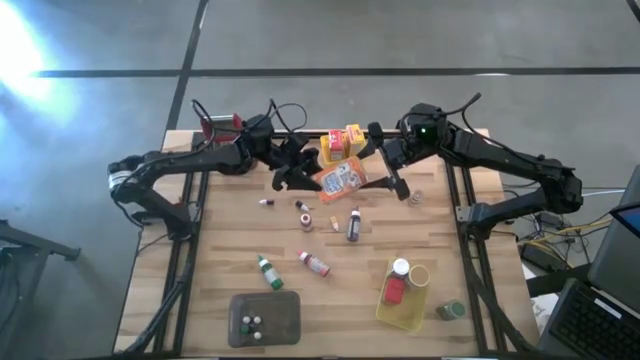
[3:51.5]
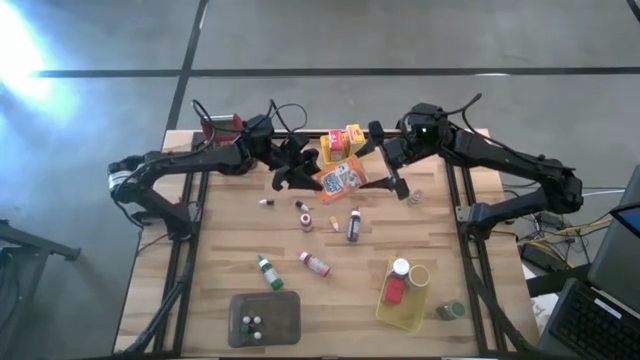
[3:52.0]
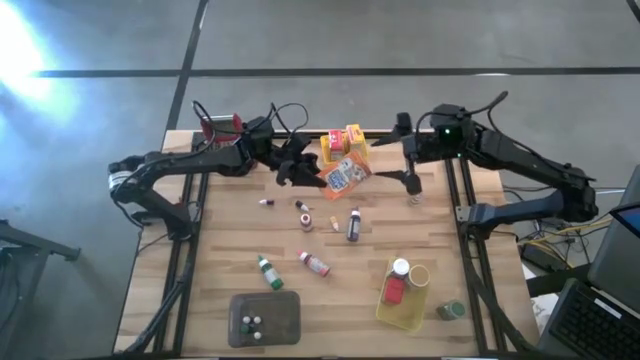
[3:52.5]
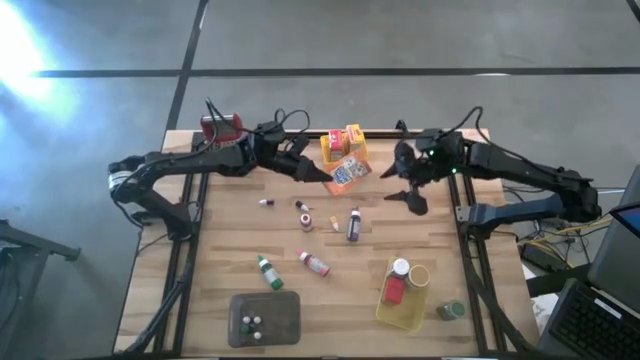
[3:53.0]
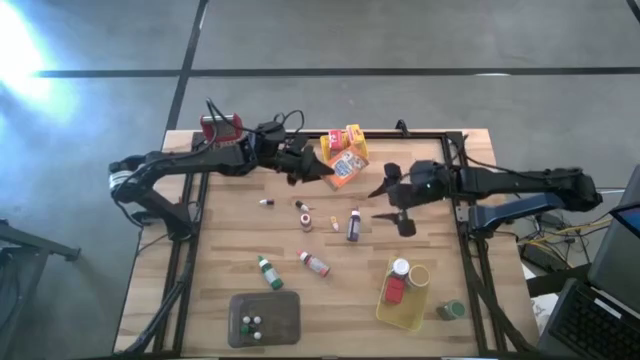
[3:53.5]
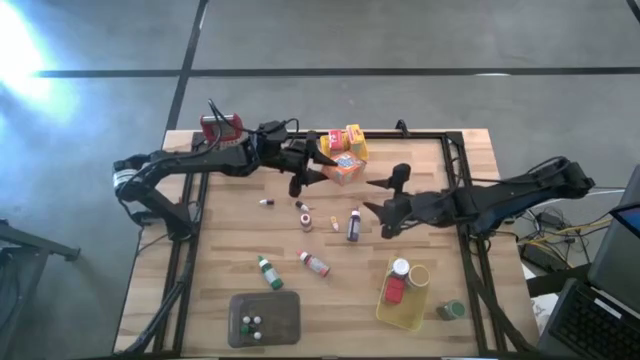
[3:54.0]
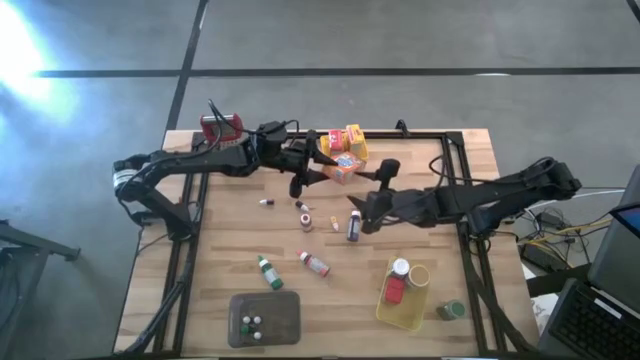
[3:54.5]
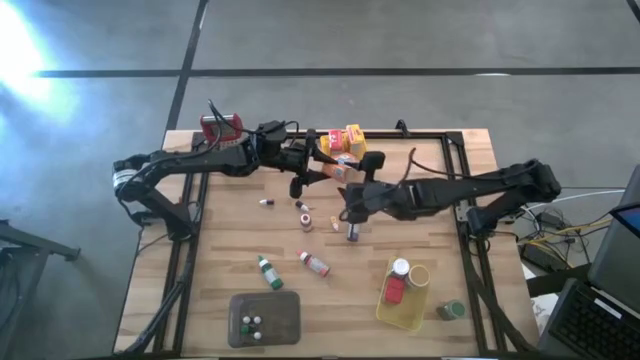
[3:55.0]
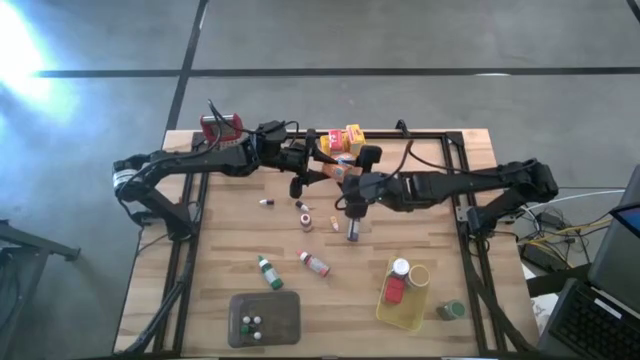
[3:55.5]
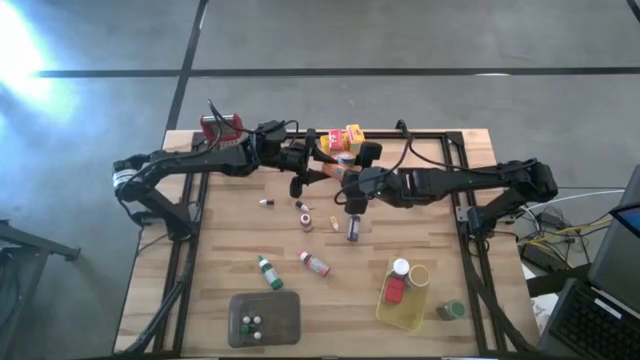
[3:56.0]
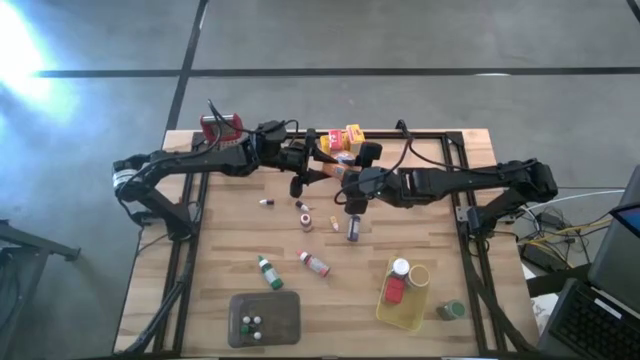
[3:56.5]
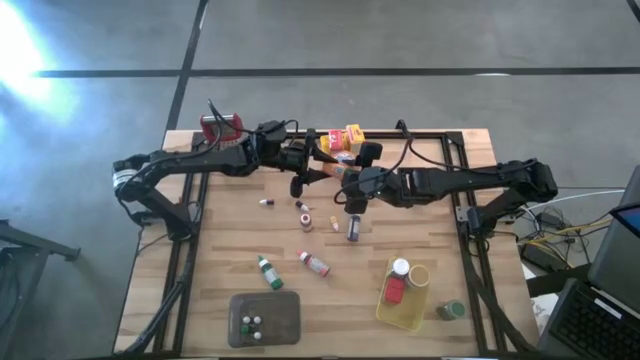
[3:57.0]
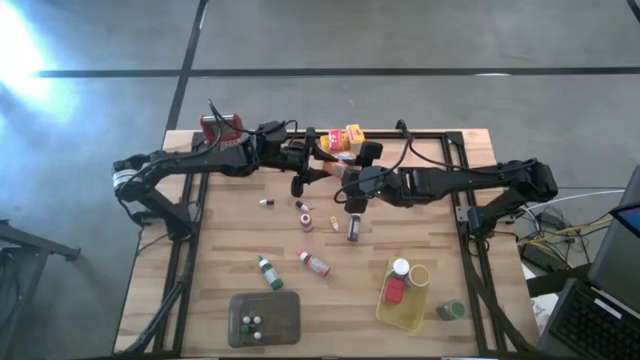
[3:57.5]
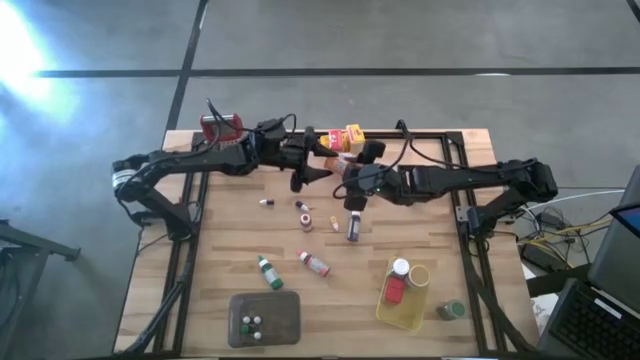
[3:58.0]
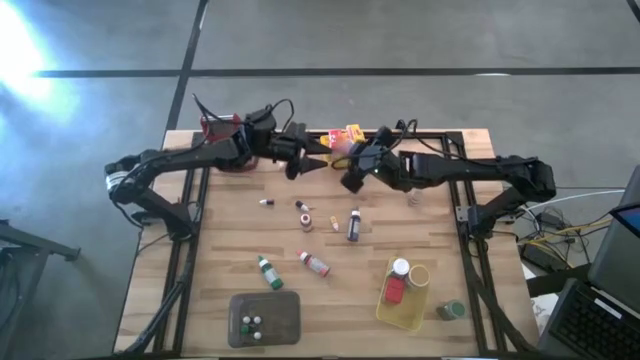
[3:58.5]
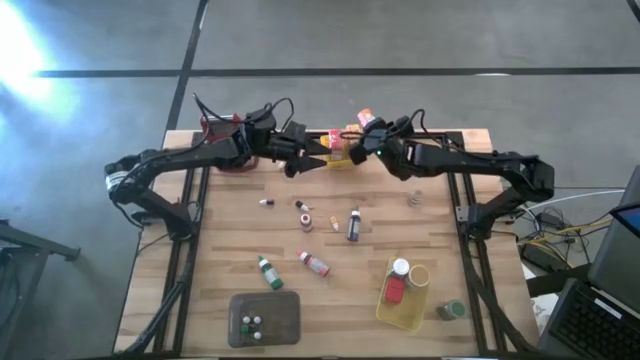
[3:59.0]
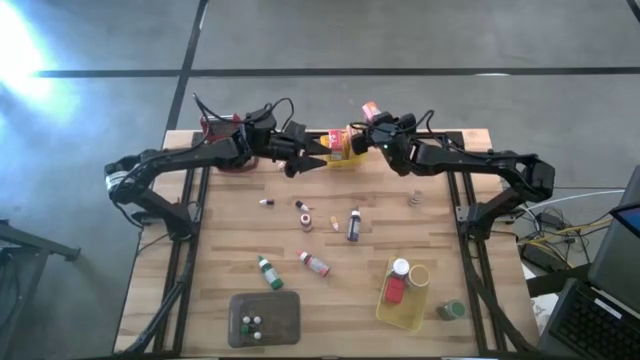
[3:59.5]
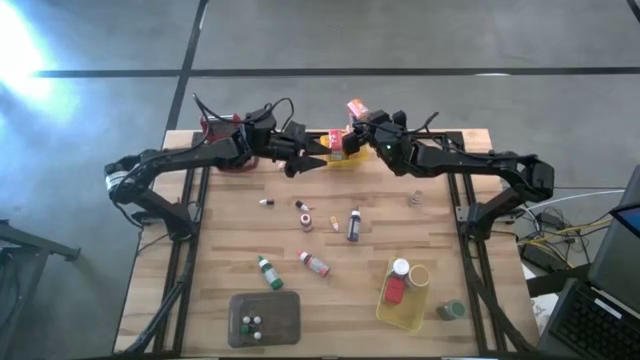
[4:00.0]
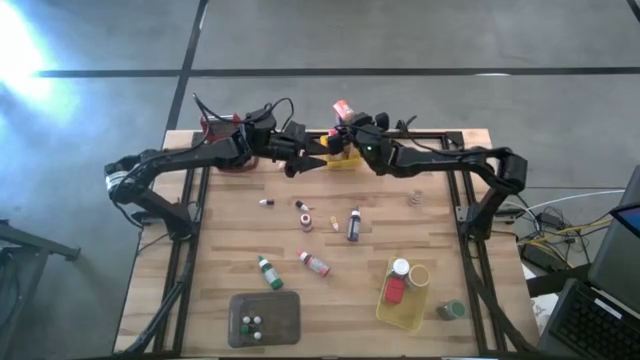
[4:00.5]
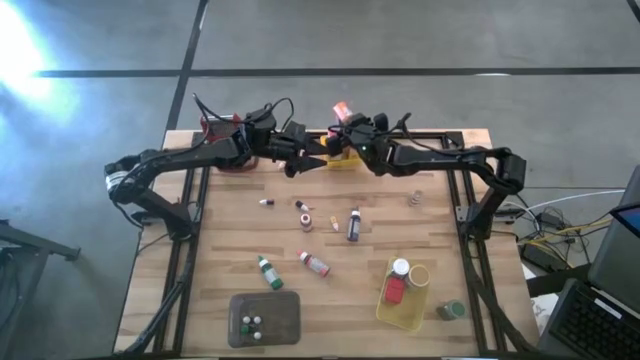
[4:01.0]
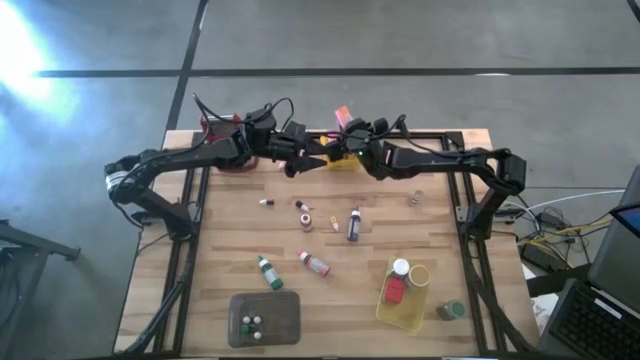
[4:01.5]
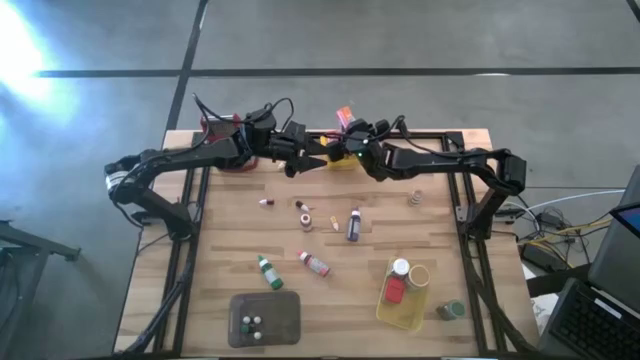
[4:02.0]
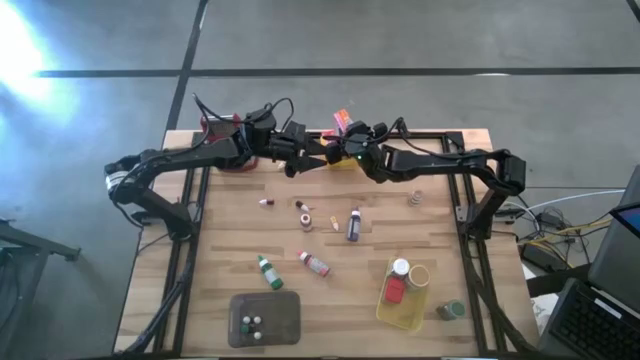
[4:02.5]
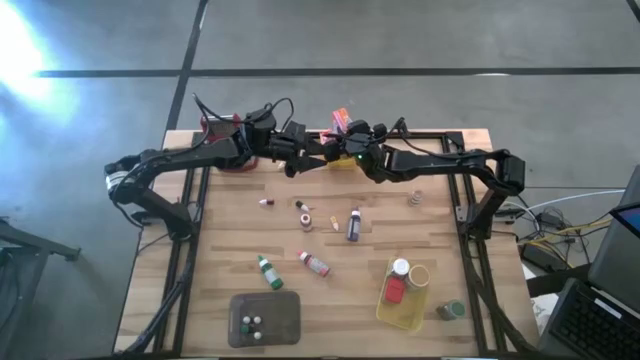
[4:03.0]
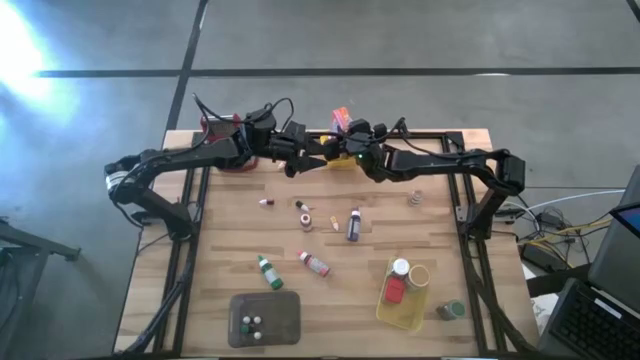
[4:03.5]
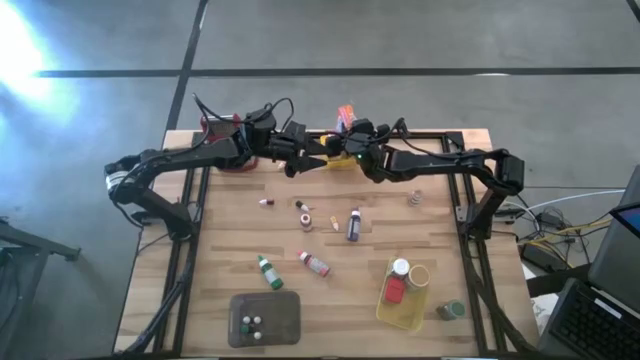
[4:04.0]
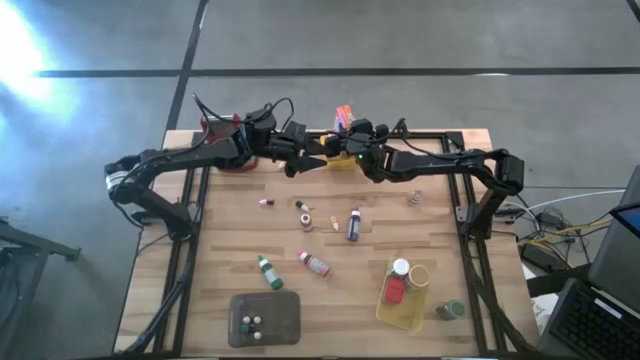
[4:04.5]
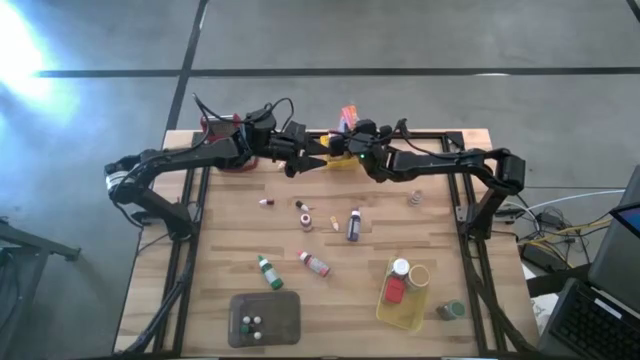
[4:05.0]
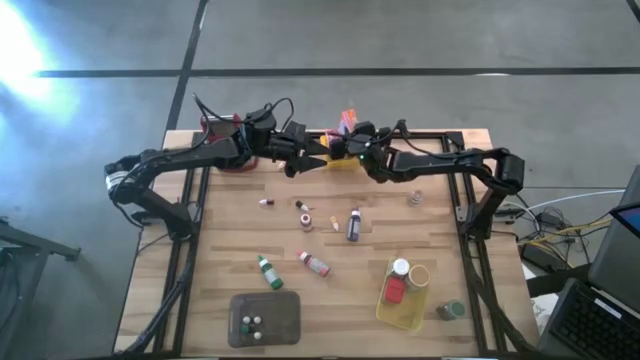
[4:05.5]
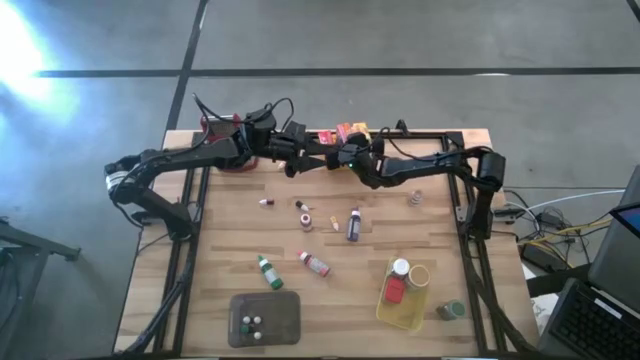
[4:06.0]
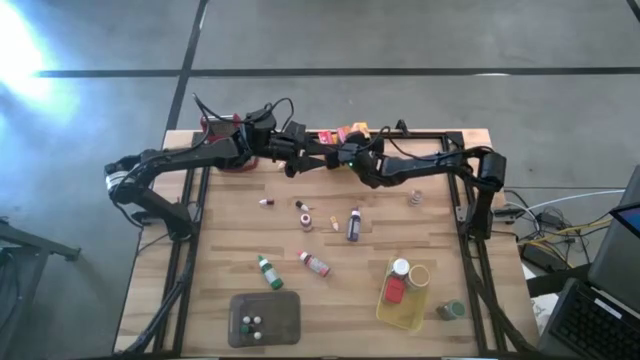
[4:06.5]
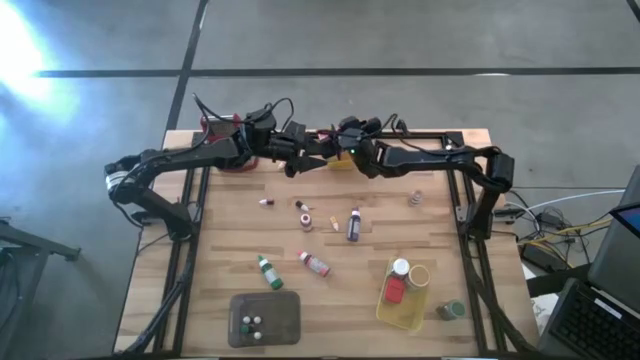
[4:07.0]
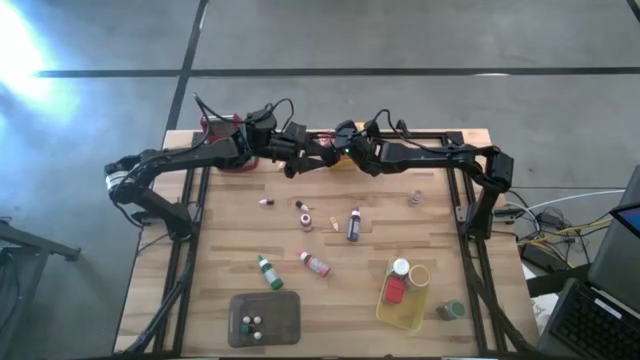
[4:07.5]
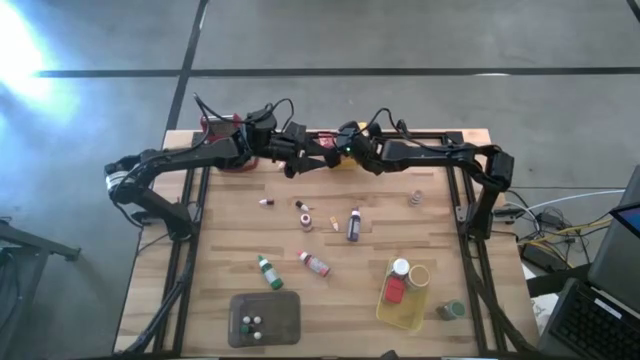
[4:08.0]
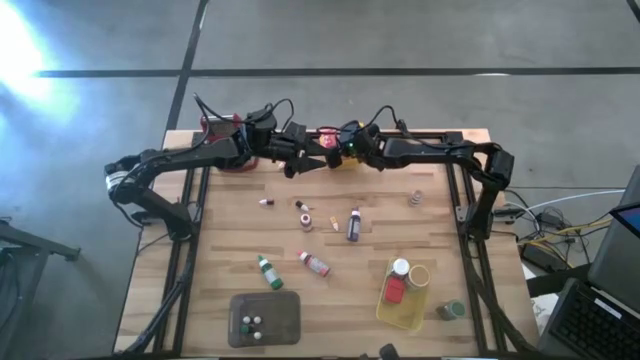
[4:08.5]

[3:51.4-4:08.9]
Task: Pick & Place Kitchen Items
Put the orange cereal box into the top yellow bin

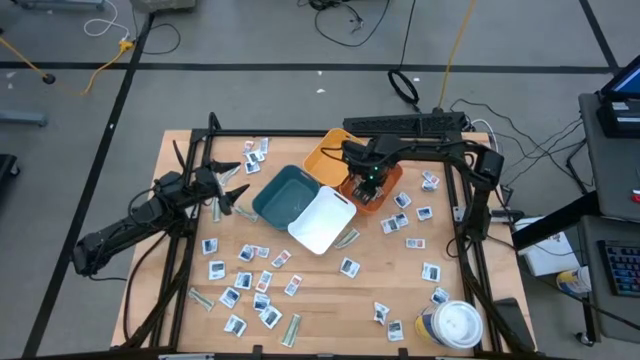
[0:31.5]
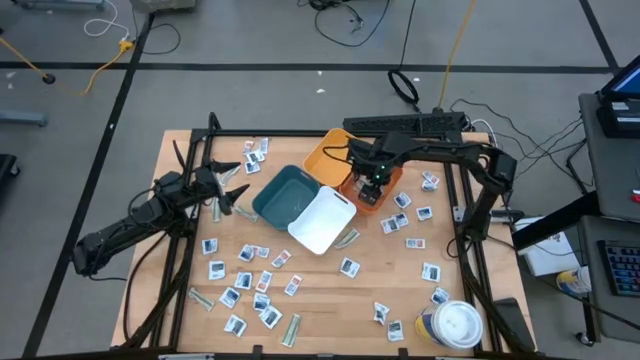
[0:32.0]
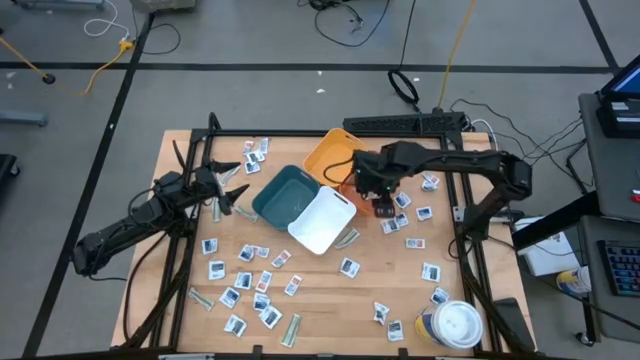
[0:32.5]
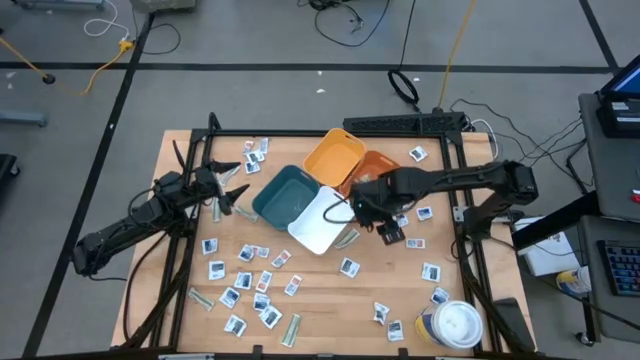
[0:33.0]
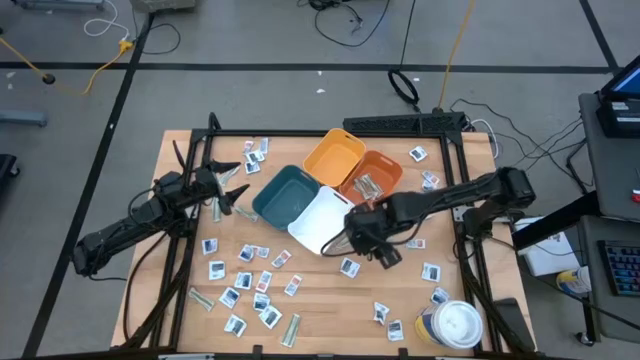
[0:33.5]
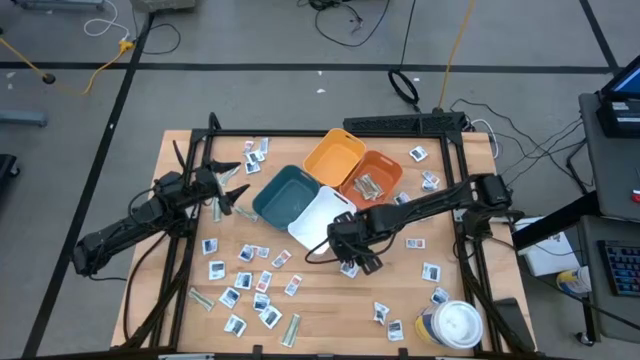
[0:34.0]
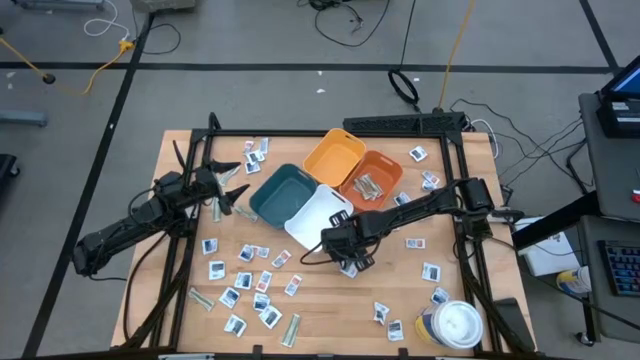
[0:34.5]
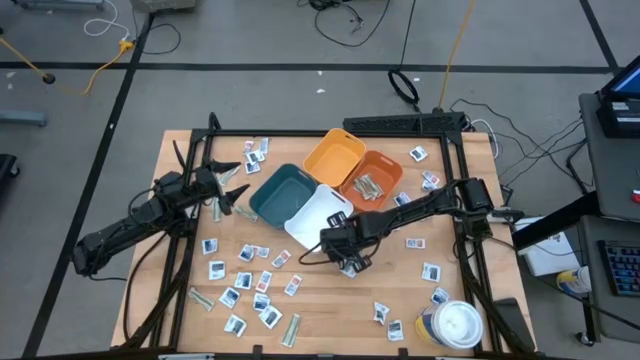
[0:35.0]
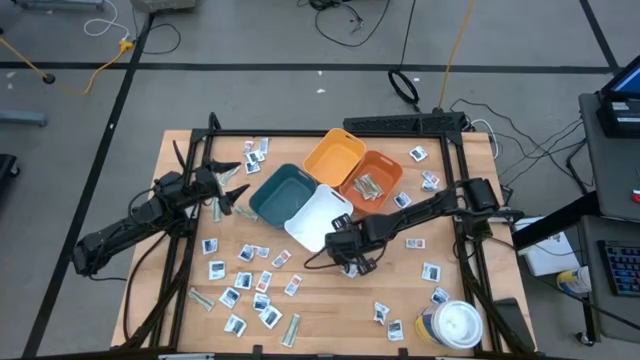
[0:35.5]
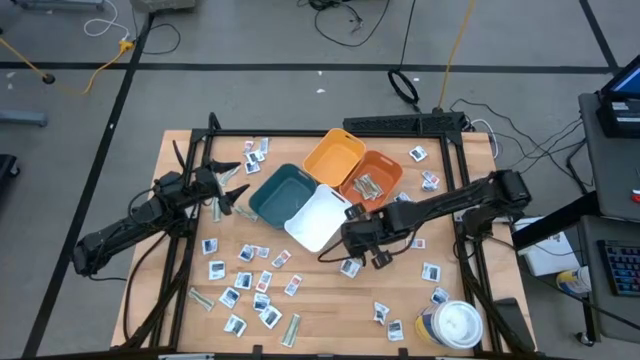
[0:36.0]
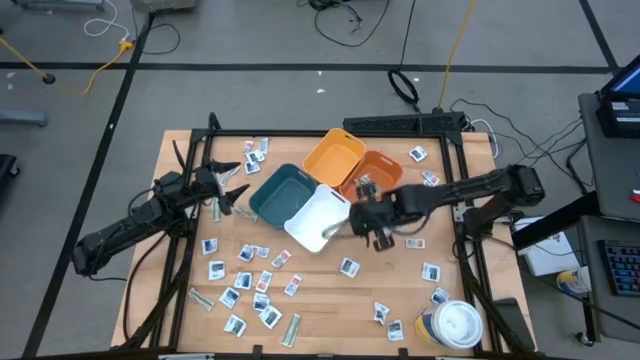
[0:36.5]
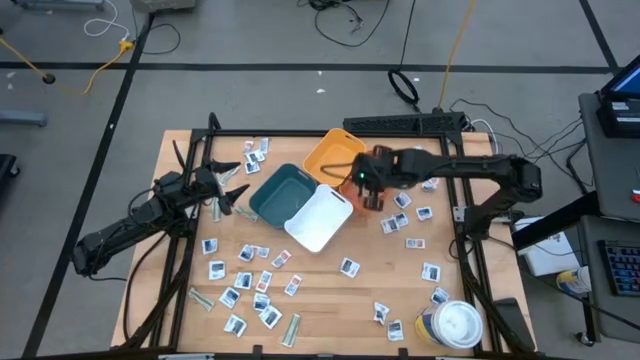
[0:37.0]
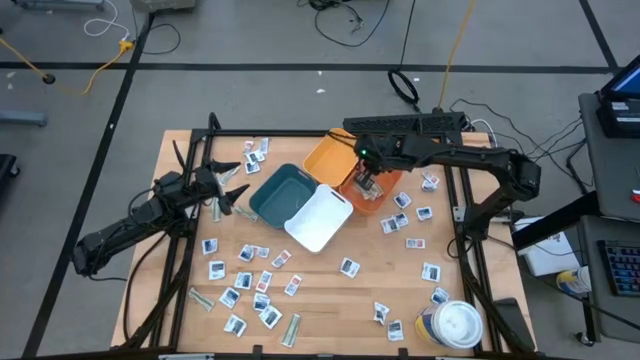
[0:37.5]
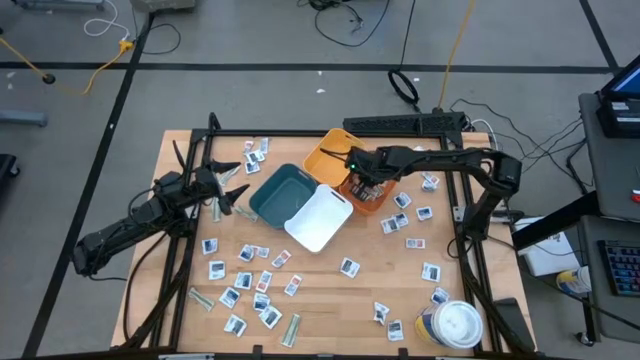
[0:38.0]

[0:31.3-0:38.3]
Task: Pick & Place First Aid Supplies
Put the green bandage pack into the orange bin
